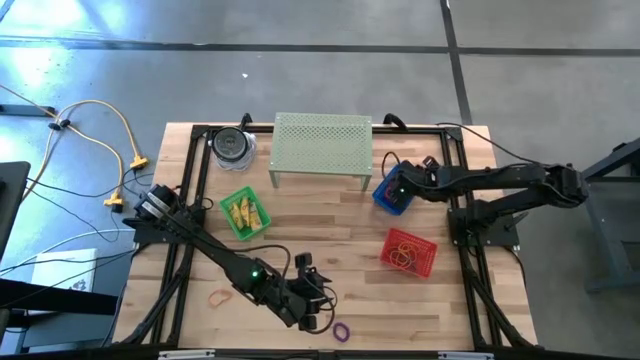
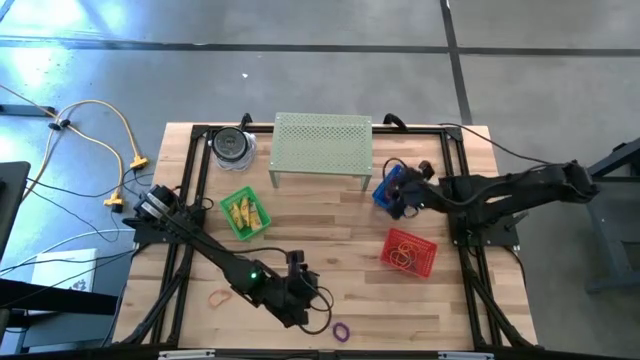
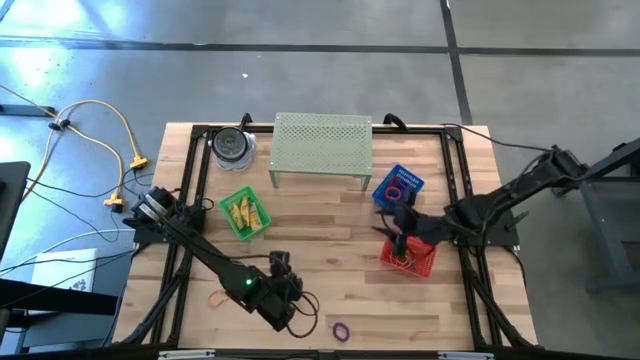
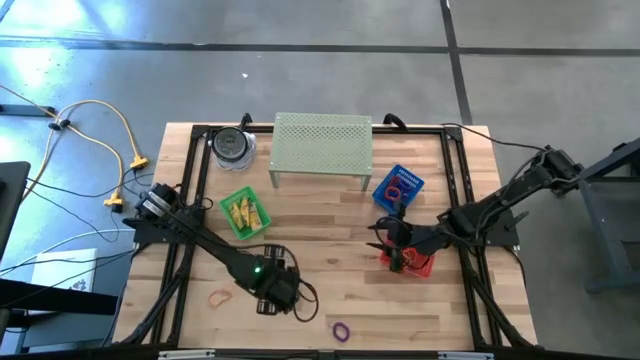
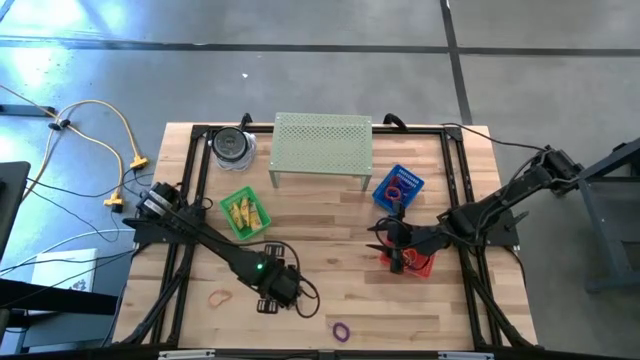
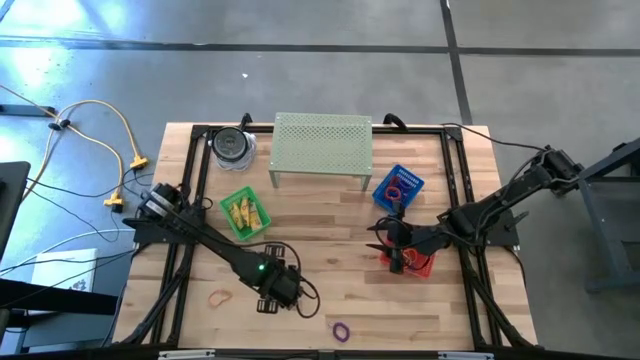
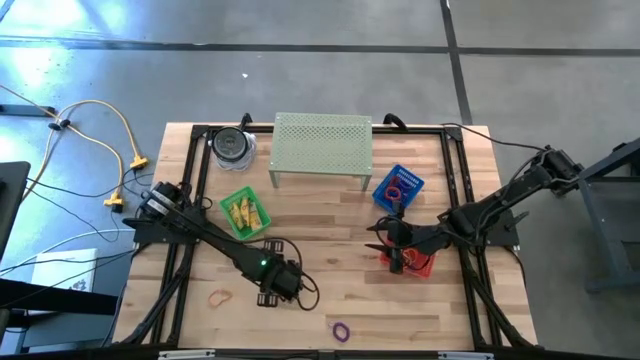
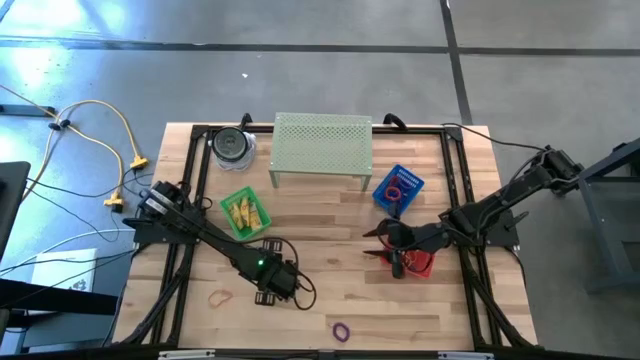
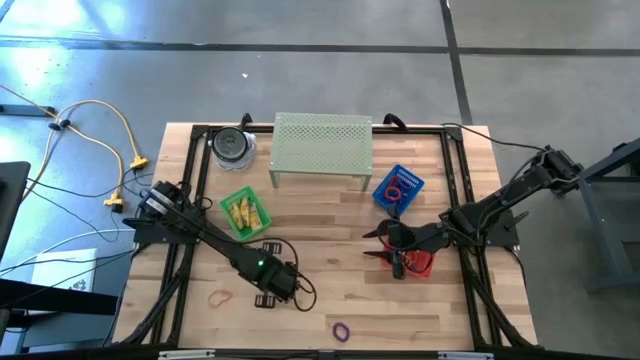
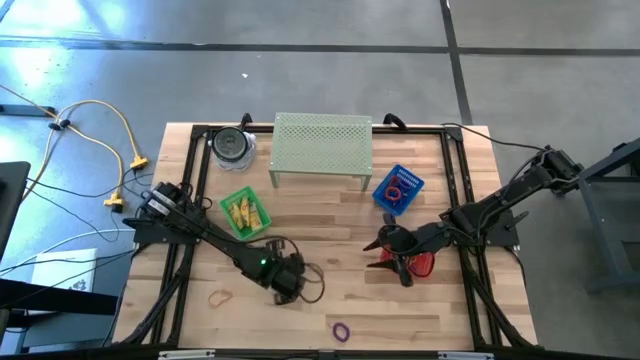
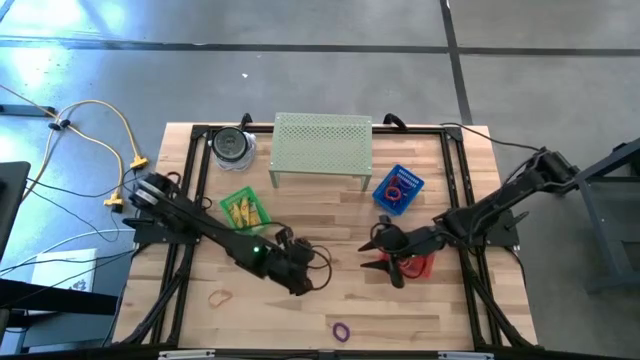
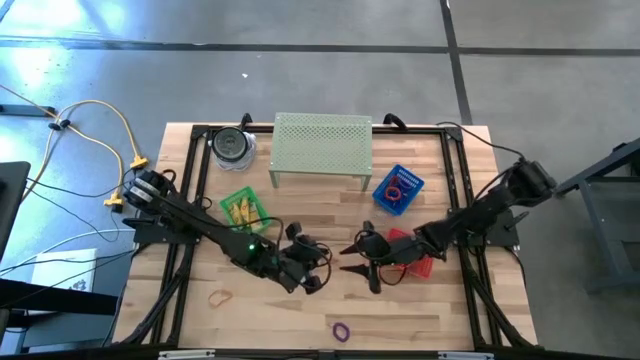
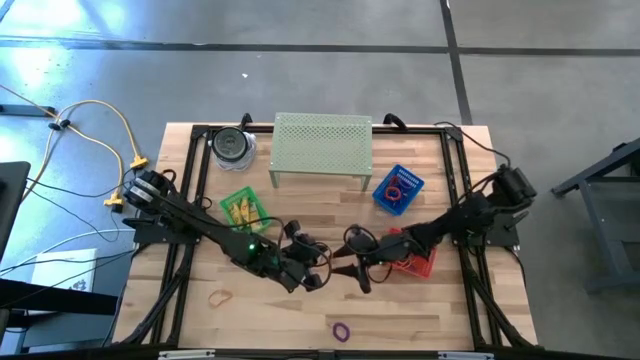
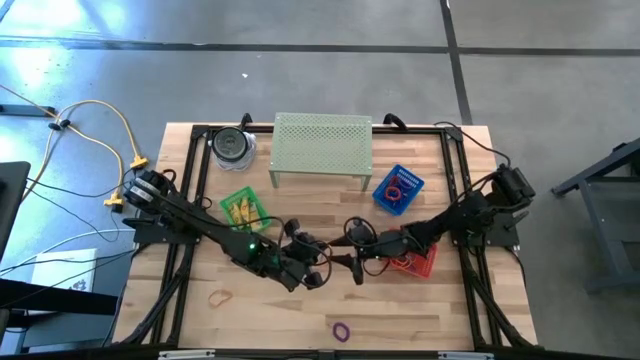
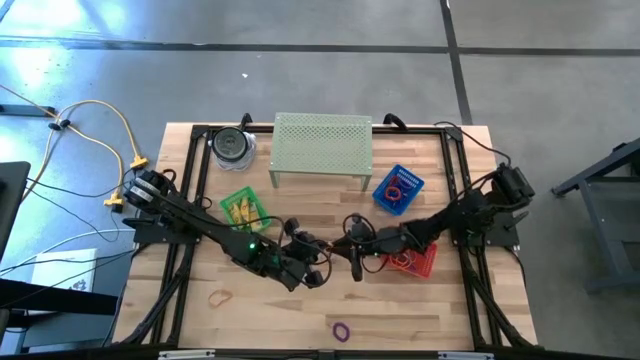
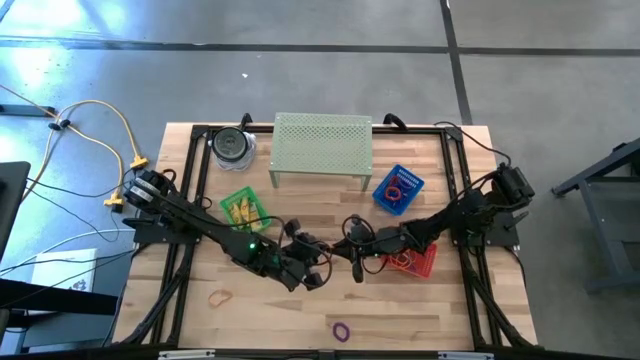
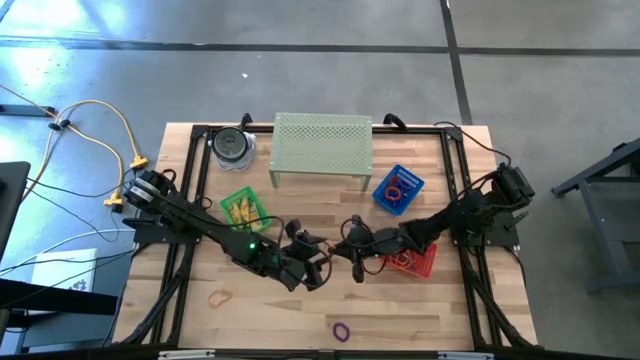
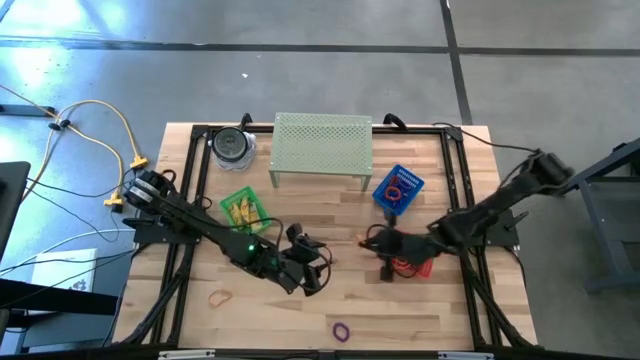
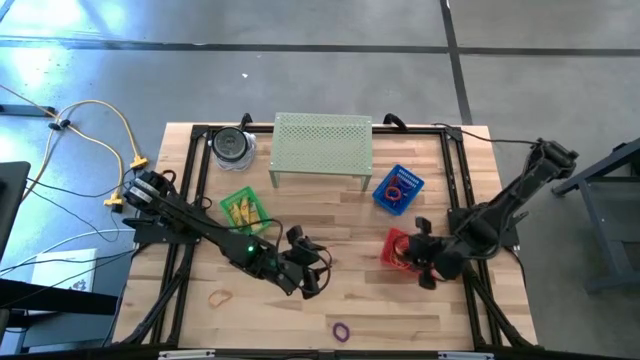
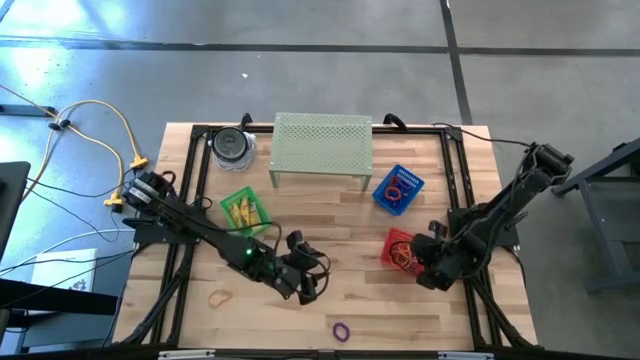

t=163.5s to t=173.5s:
Task: Pick & Place Office Desk Supplies
Put the orange rubberband into the red basket

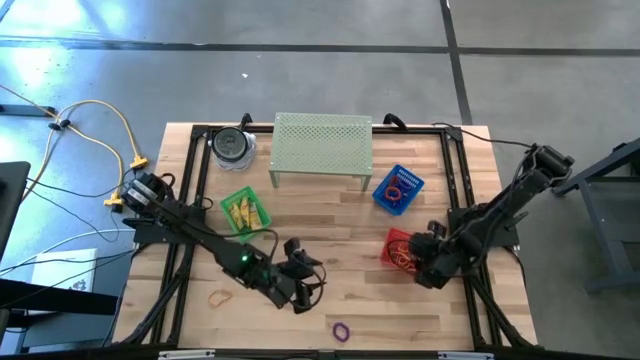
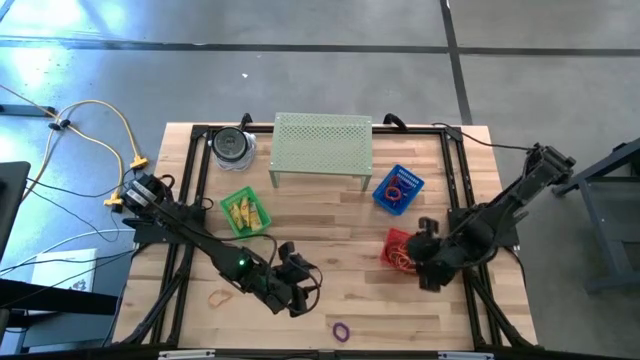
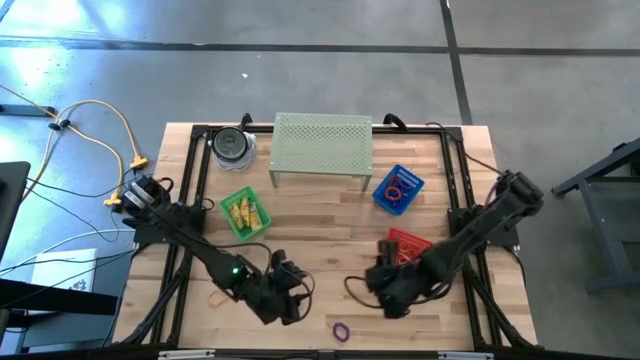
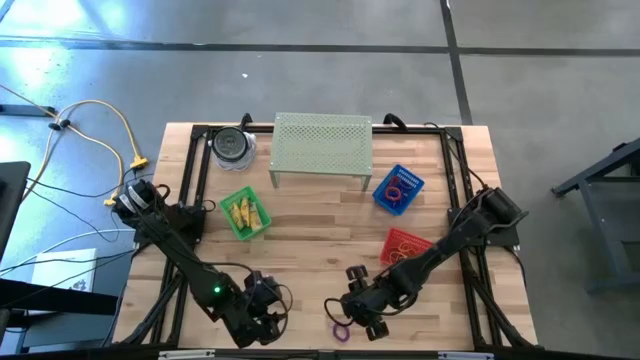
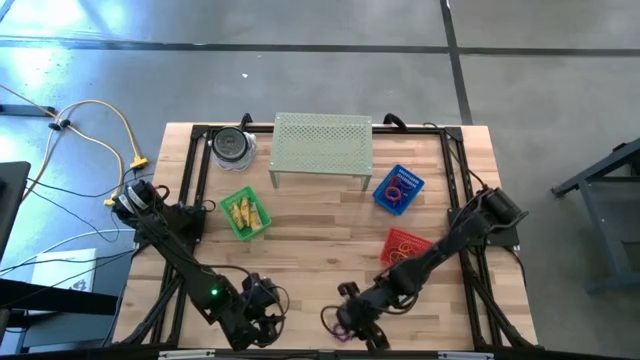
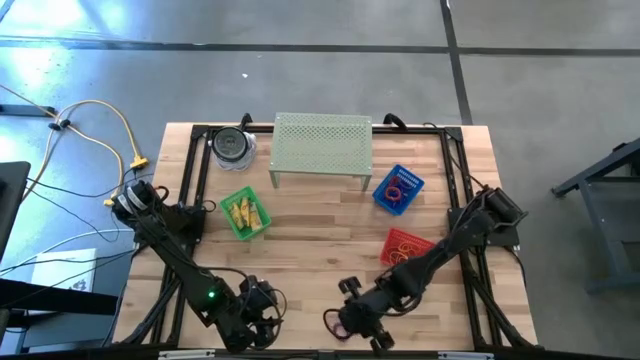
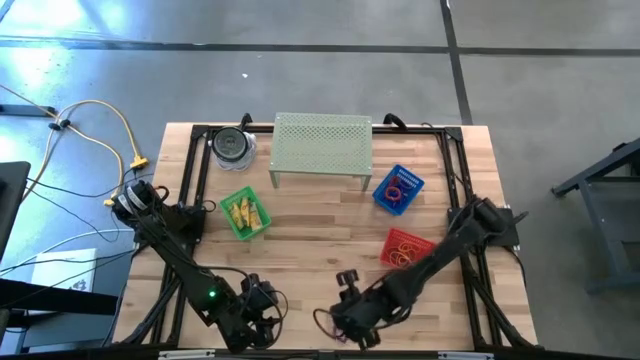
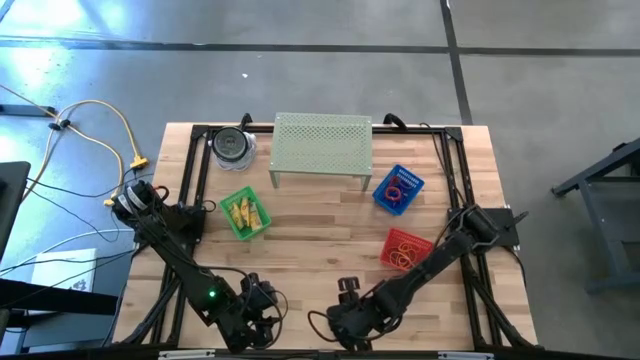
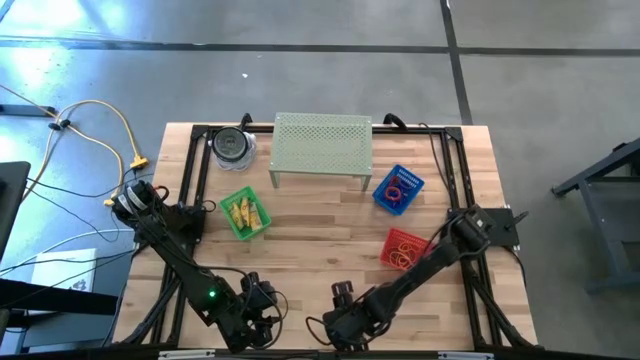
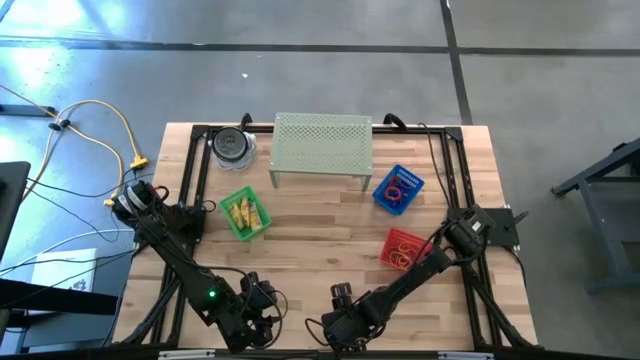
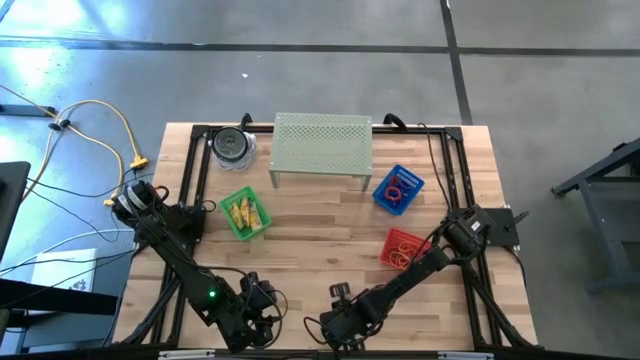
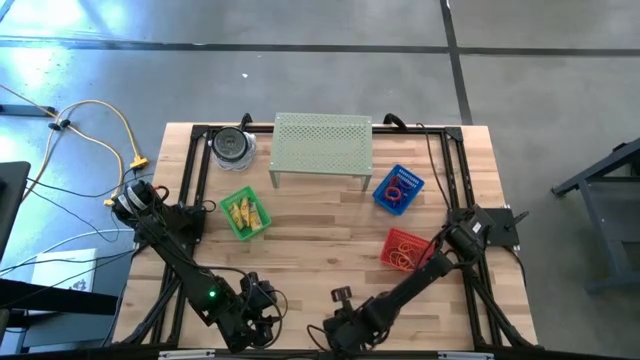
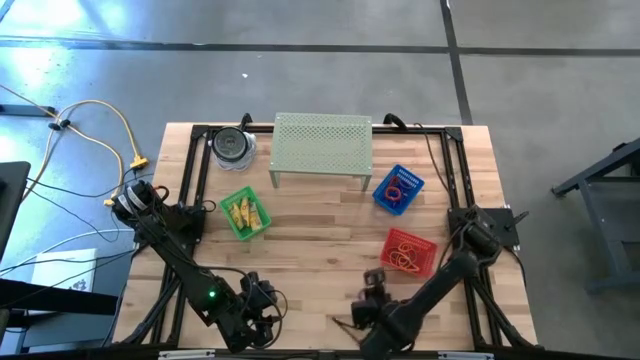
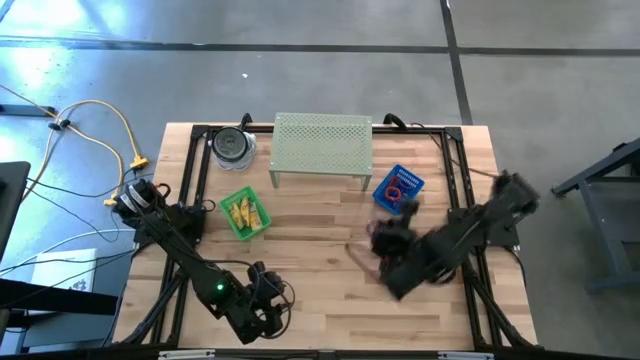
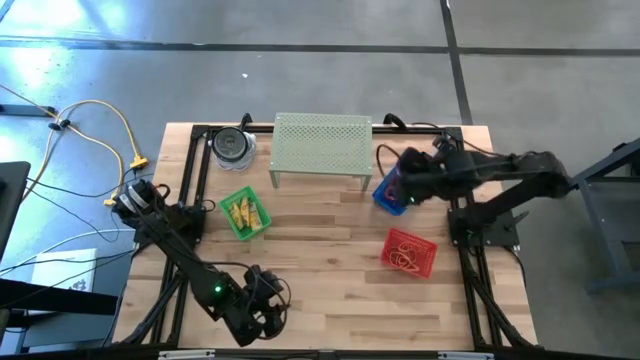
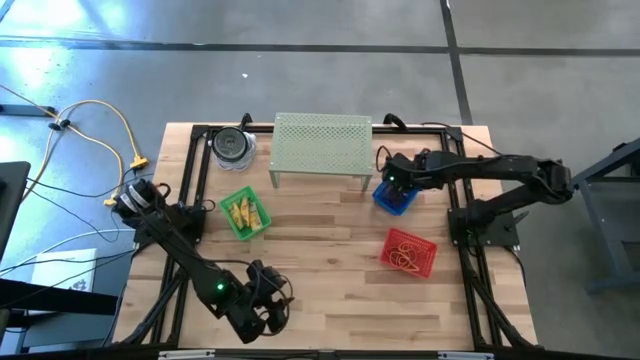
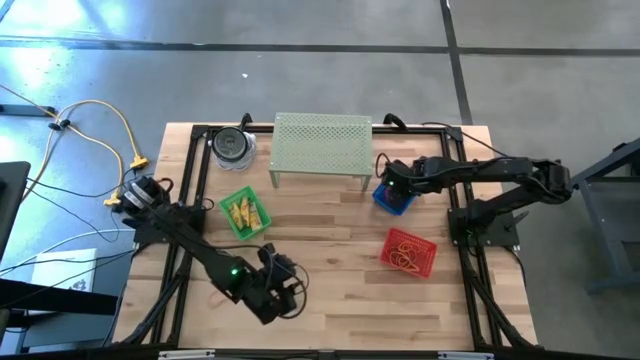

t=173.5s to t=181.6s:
Put the blue spring keychain into the blue basket

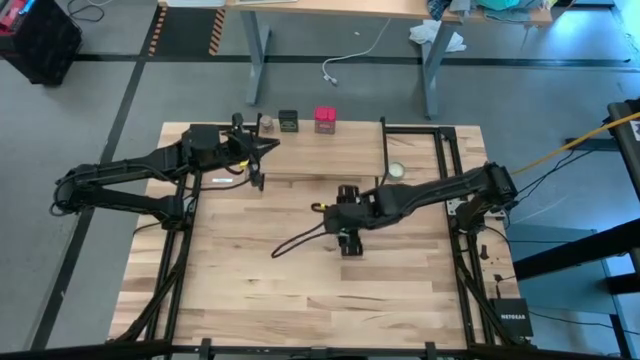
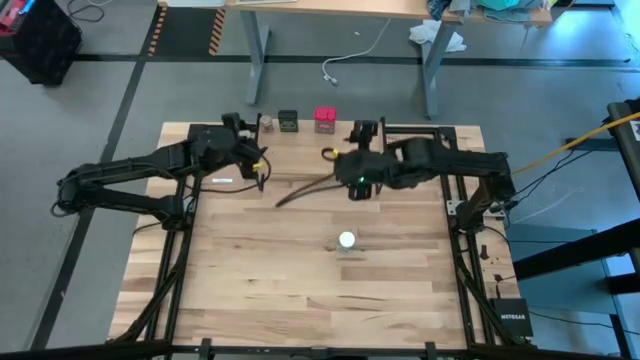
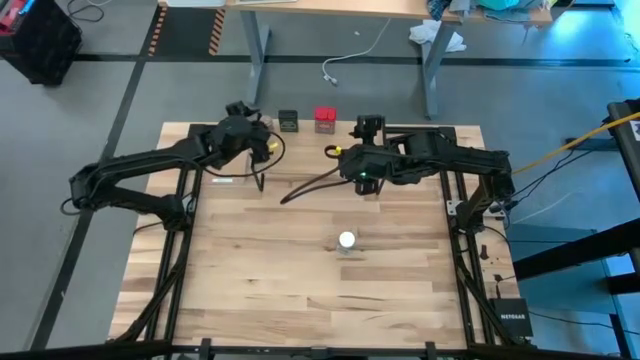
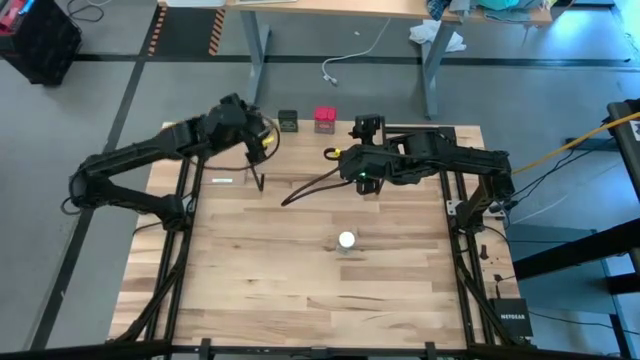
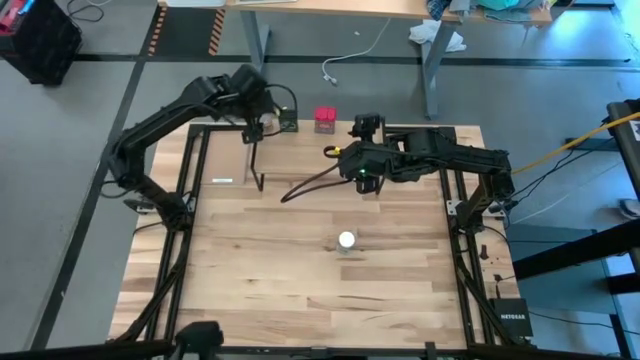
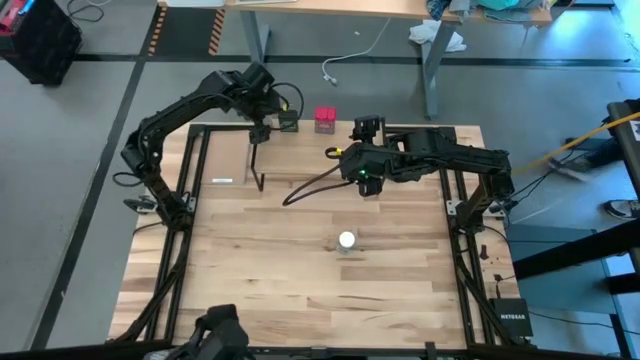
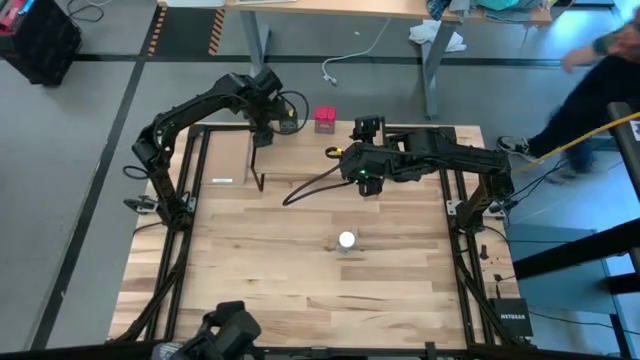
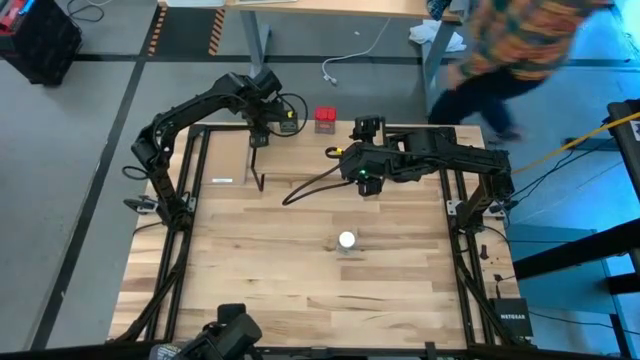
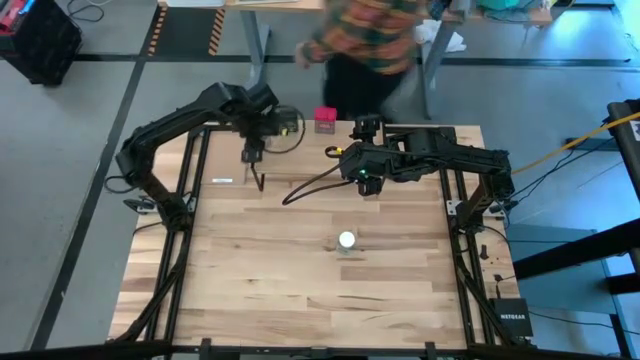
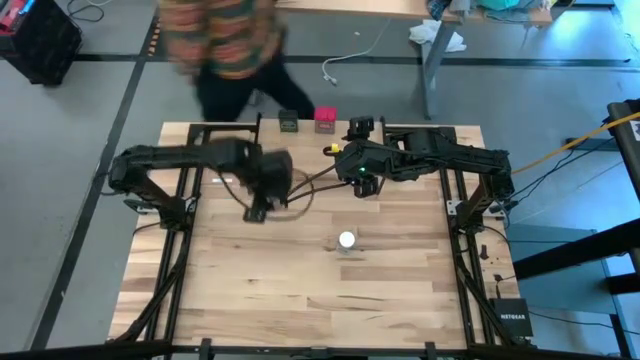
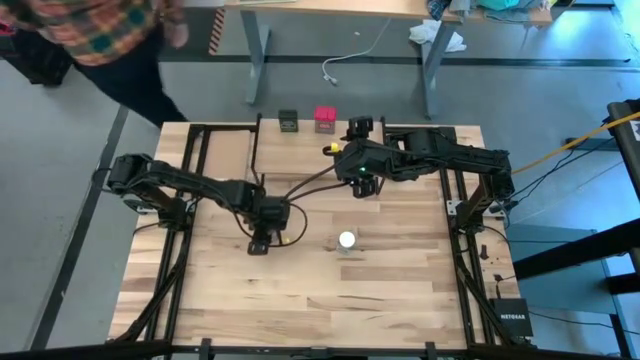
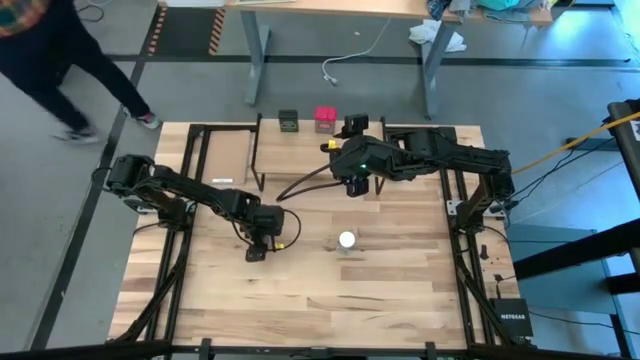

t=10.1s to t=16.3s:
Task: Shelf spices
Remove the transparent seasoning bottle from the shelf
